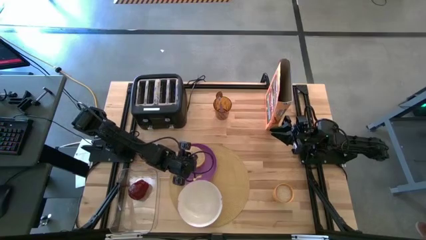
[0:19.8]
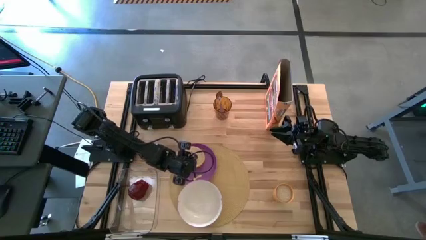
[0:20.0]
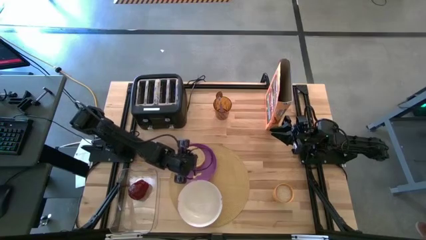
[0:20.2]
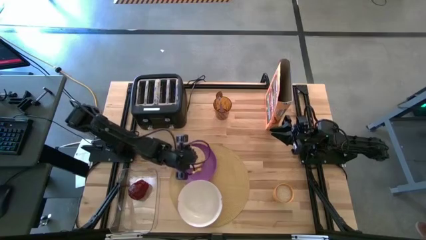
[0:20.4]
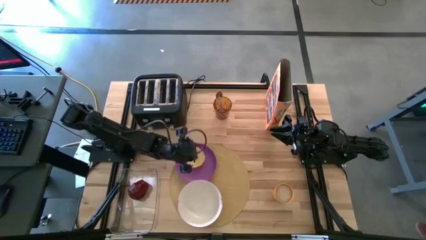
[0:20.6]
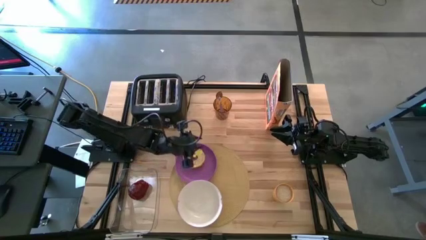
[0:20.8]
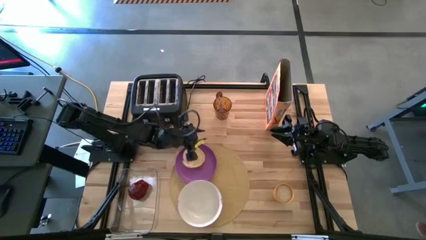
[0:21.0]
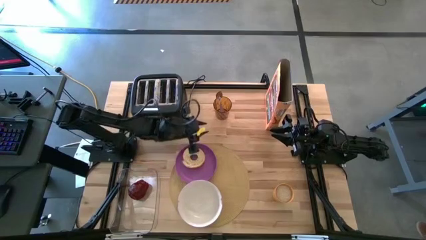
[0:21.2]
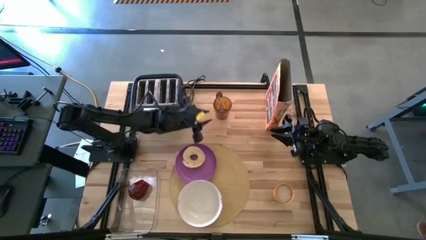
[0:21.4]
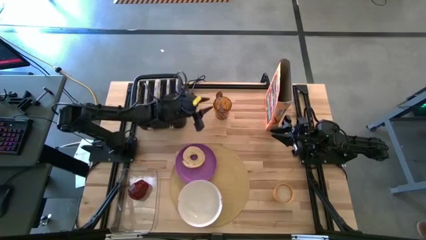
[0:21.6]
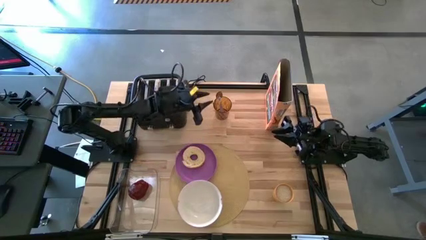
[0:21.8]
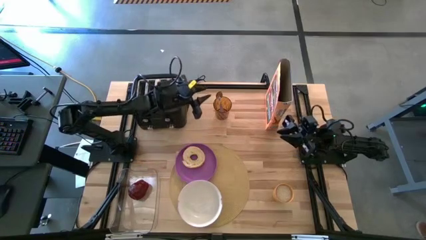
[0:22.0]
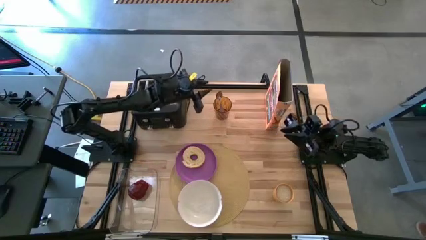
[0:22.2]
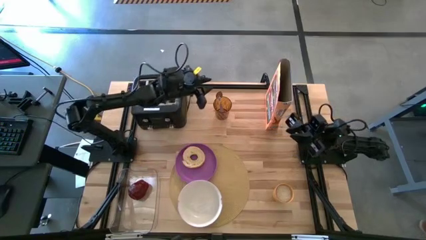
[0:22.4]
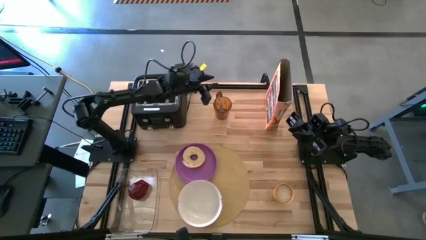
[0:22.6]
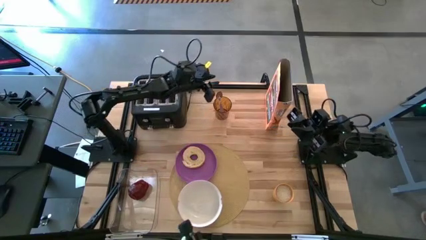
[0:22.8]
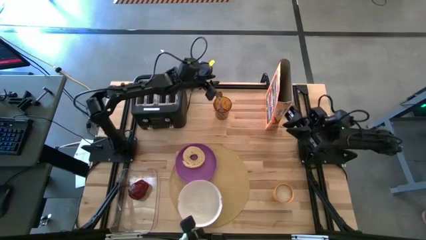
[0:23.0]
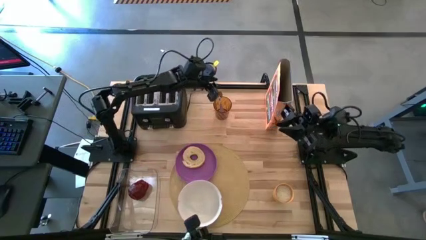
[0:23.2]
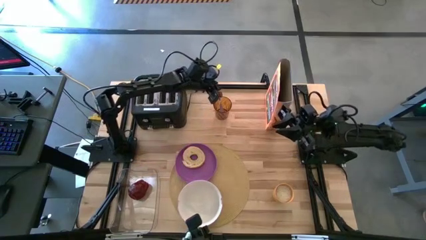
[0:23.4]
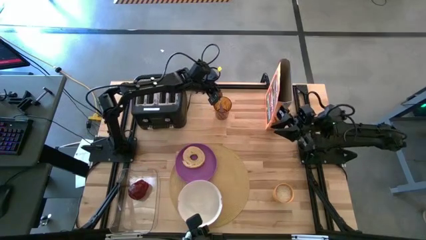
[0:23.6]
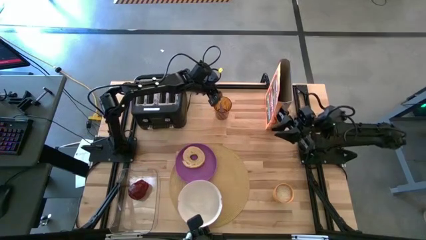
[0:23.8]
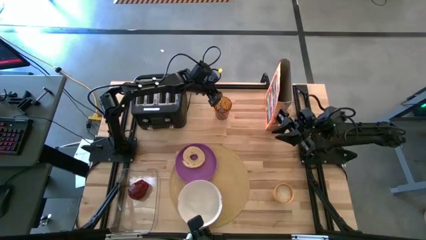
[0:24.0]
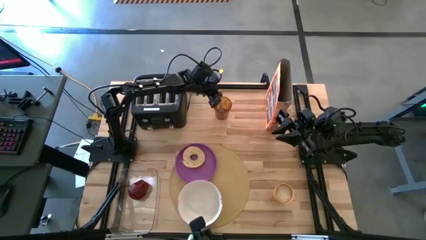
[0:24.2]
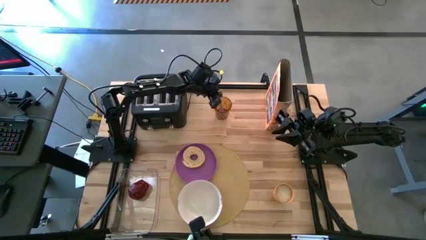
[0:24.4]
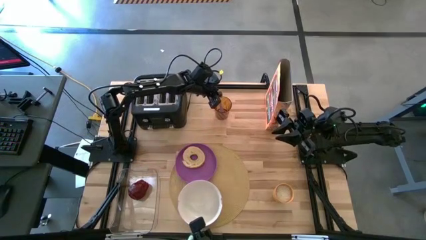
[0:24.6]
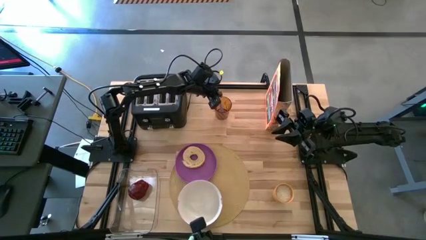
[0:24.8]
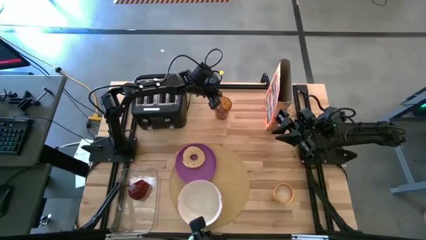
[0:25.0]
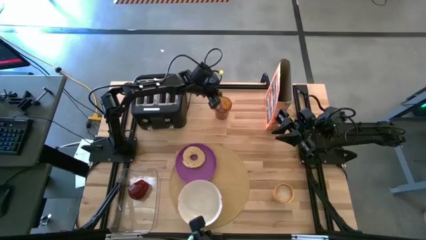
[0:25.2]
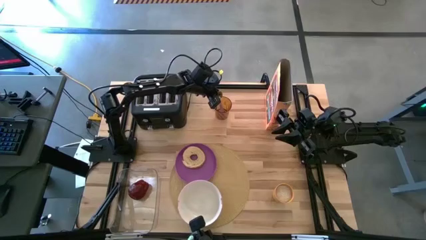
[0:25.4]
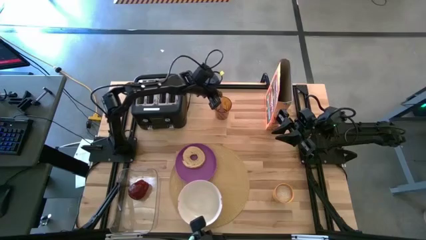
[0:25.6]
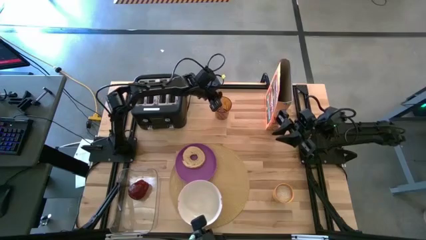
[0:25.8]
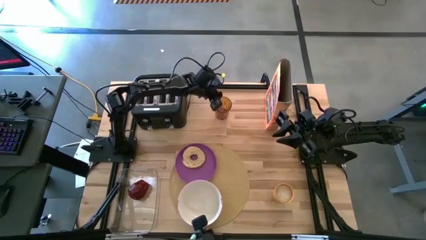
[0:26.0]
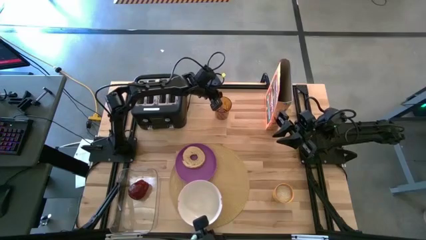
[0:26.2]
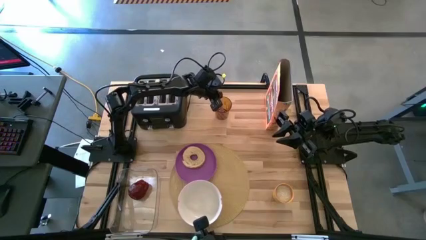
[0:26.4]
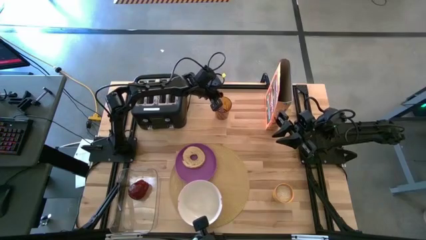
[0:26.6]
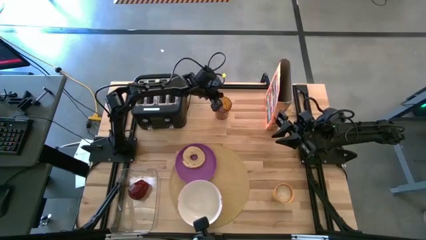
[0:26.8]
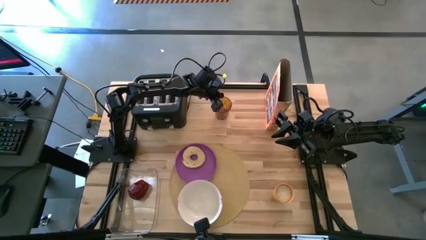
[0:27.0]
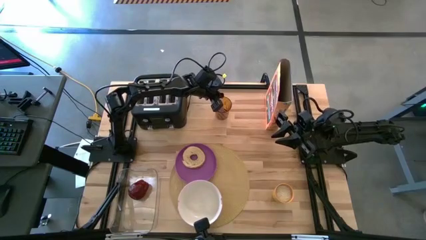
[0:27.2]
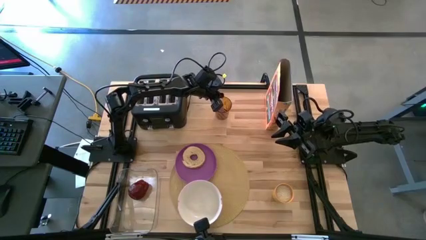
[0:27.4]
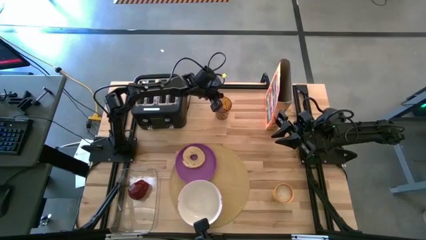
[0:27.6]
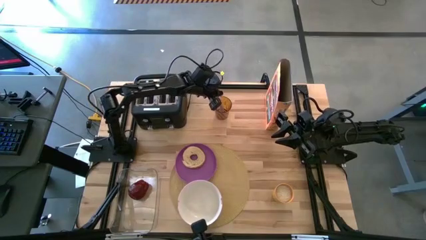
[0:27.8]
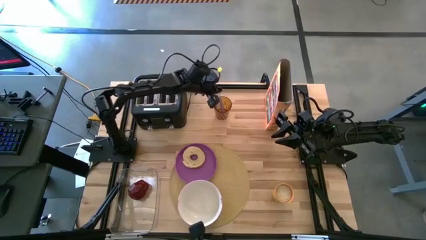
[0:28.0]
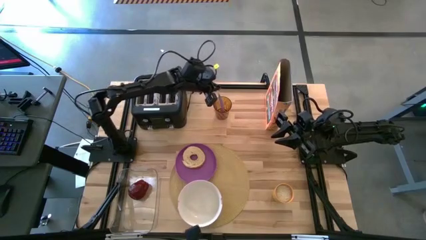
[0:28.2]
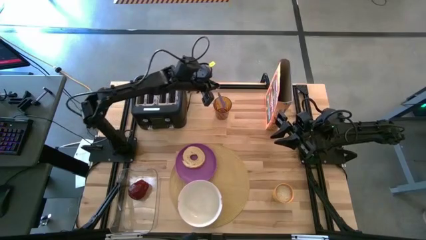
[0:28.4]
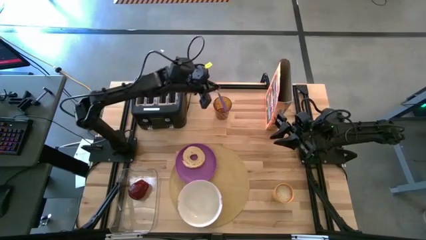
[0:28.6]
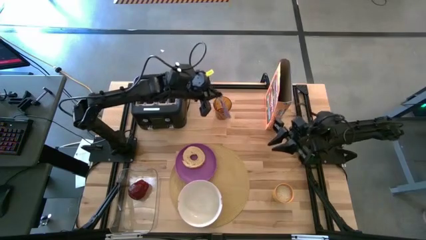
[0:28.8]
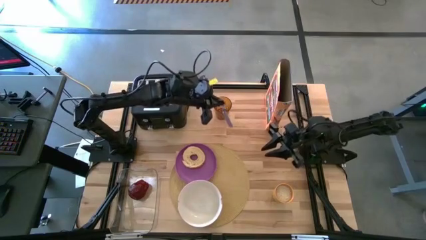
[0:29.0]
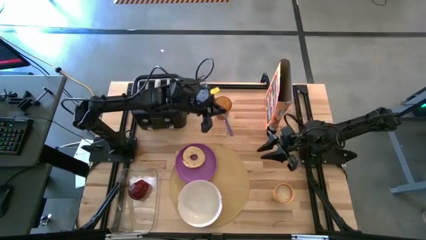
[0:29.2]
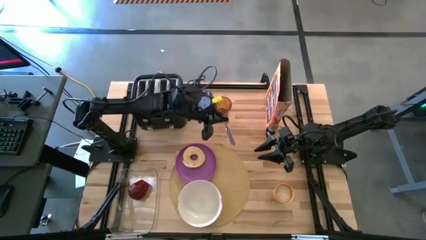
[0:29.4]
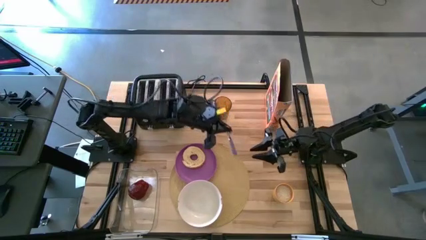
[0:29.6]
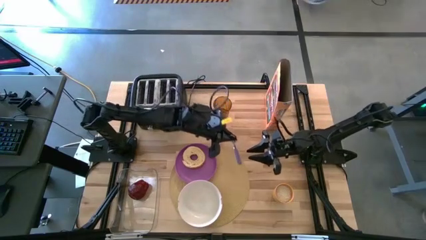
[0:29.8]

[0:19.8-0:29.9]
Task: Arrange a breakfast setting
Put the spoon from the glass onto the placemat to the right of the white bowl

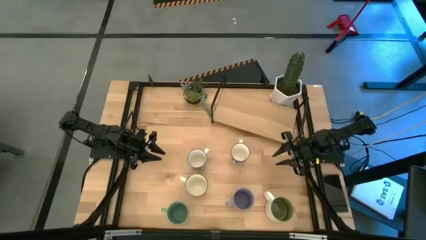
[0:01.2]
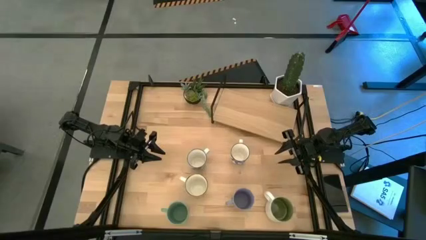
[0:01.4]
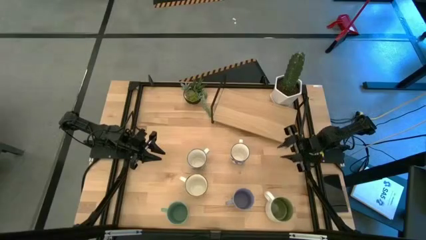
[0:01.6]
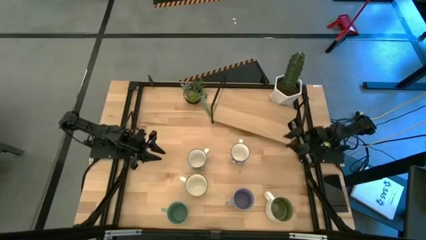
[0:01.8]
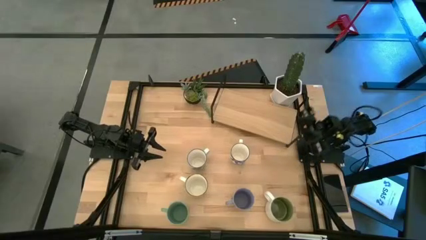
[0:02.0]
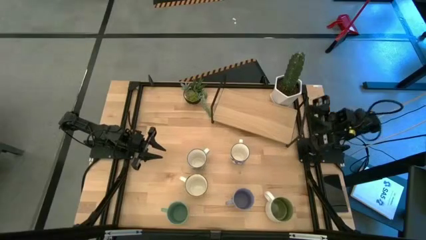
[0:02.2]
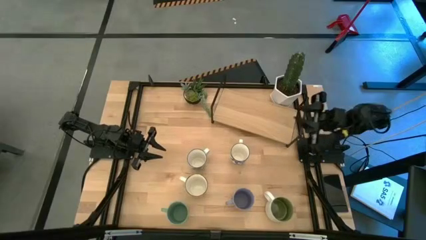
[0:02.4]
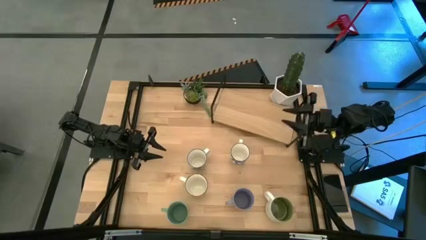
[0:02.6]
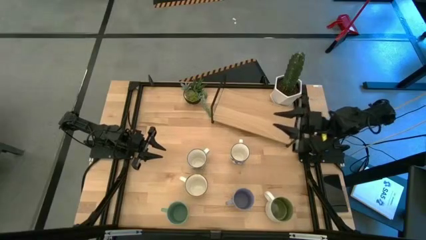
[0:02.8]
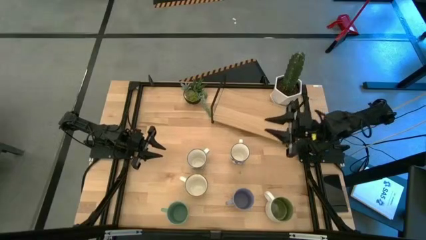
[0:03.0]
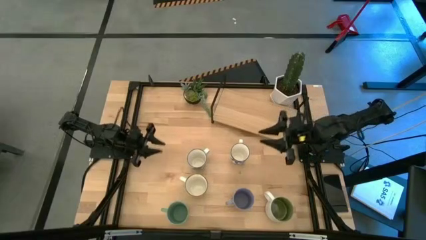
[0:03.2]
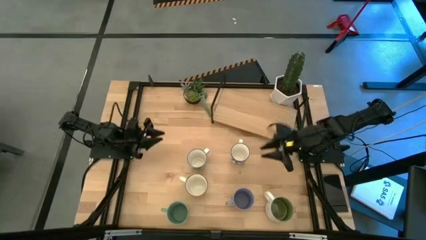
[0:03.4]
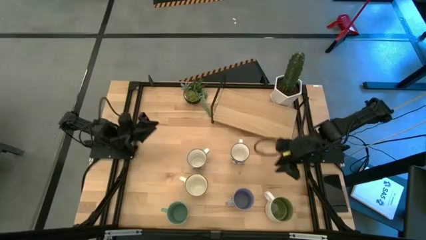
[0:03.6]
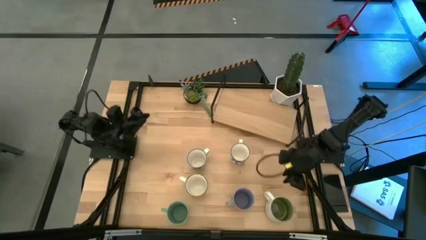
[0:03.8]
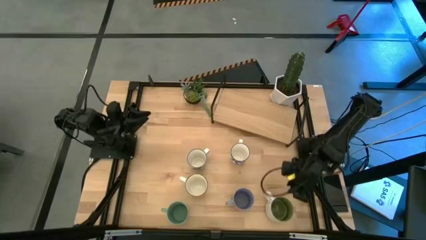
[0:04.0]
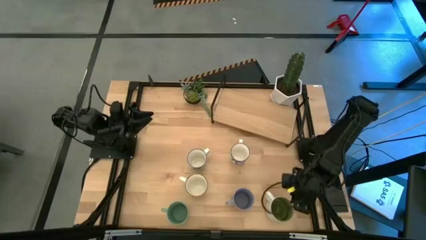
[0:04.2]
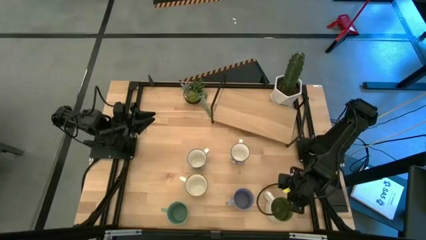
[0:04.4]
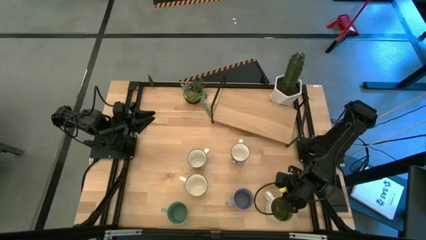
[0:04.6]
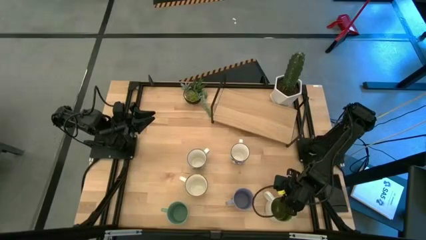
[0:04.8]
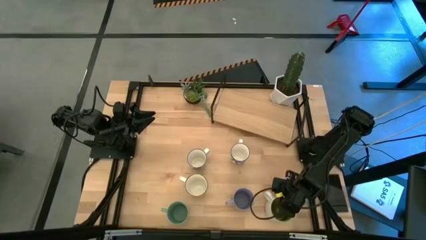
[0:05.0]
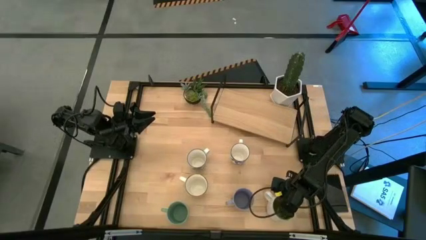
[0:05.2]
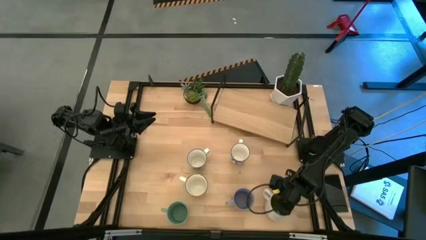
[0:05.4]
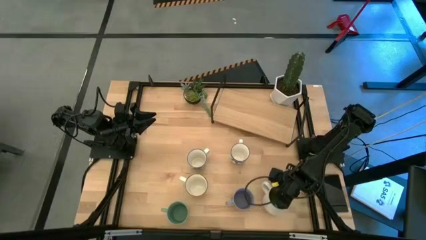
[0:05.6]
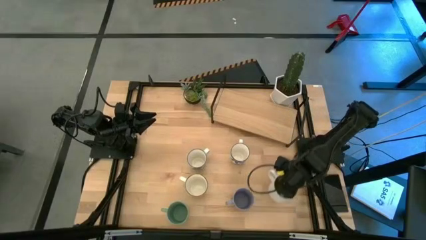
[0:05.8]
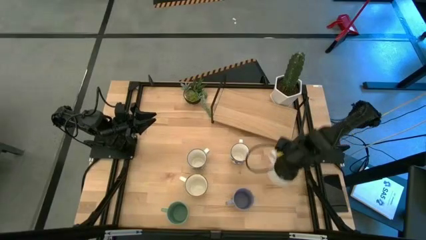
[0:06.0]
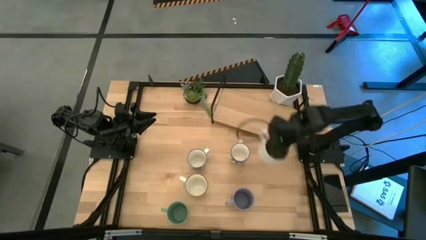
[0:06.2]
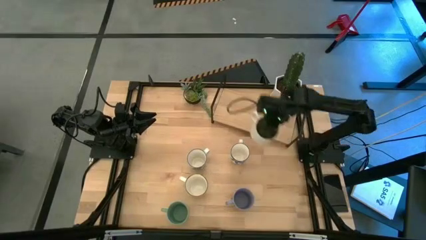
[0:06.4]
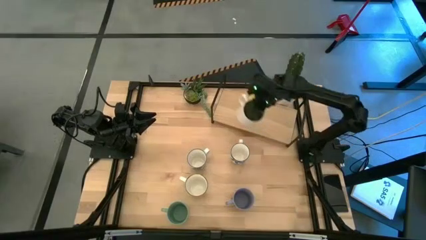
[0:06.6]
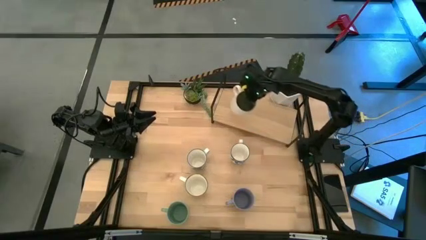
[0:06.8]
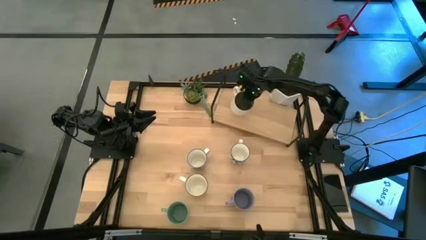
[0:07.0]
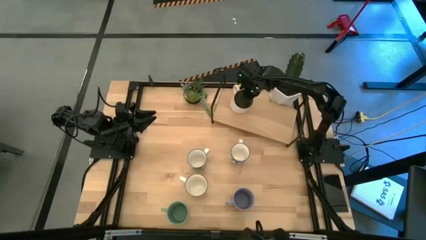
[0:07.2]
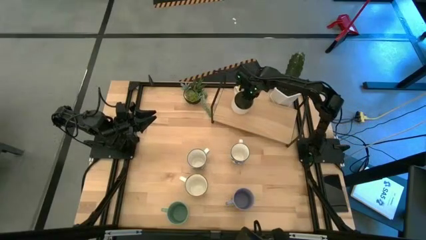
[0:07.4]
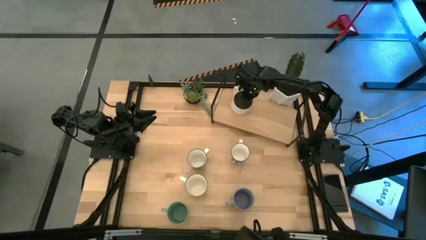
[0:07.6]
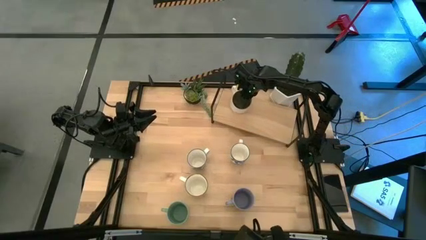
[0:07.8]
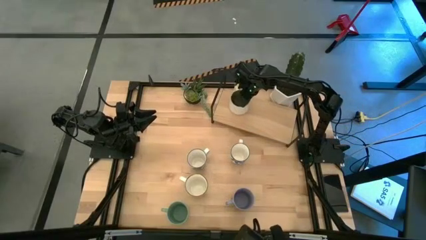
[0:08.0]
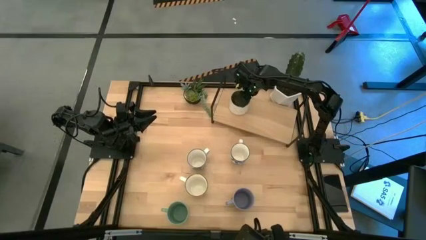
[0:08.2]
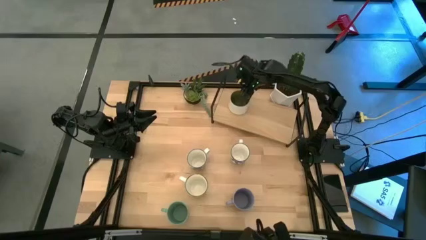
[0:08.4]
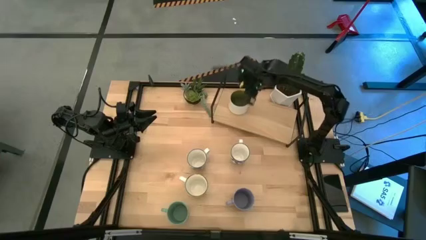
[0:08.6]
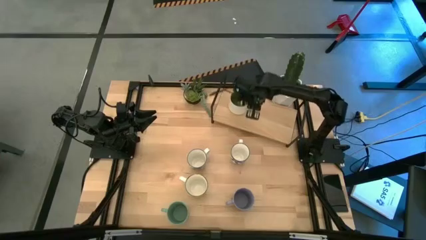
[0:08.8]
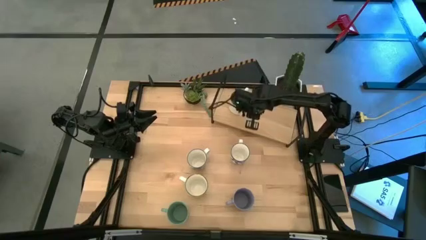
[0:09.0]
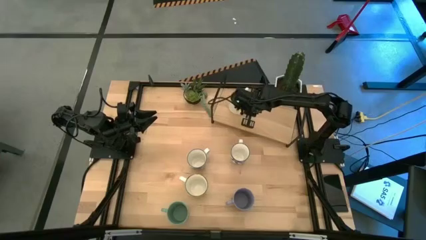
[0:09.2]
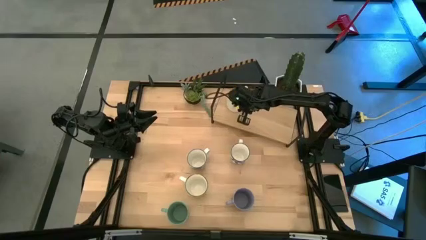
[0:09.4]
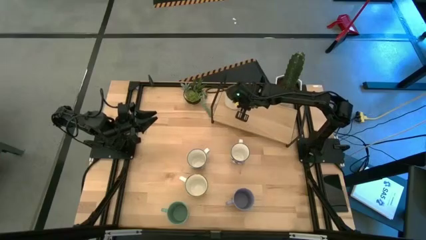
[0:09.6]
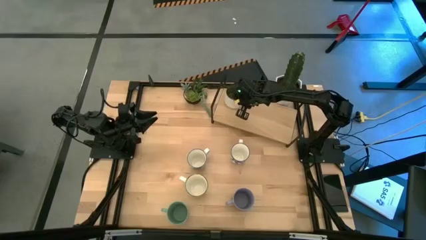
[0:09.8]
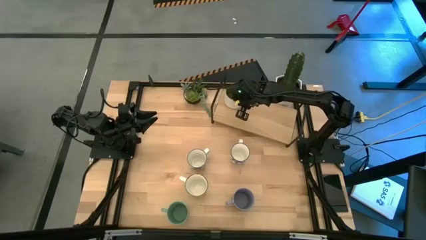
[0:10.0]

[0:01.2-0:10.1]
Task: Place coffee mugs
Put the white mug on the shelf
